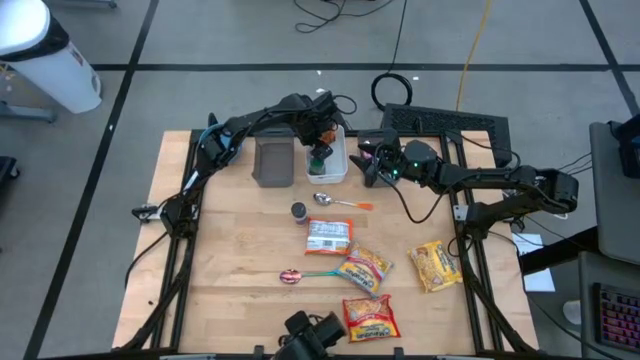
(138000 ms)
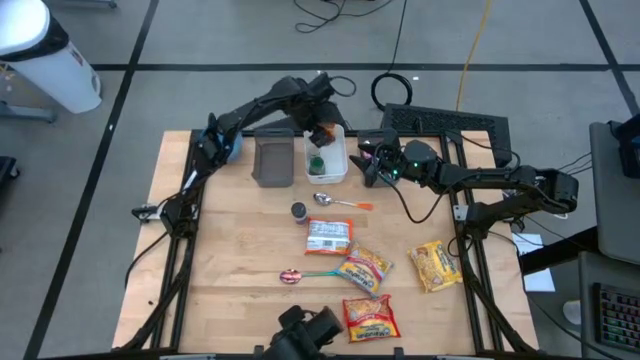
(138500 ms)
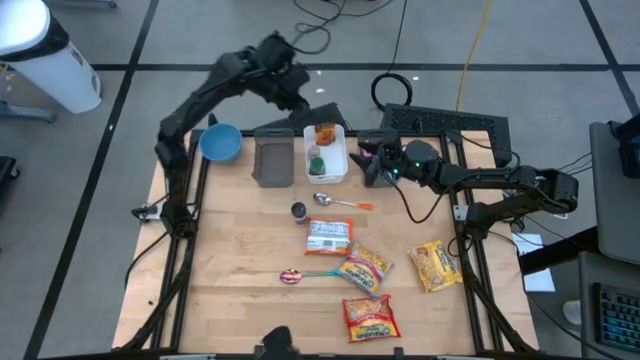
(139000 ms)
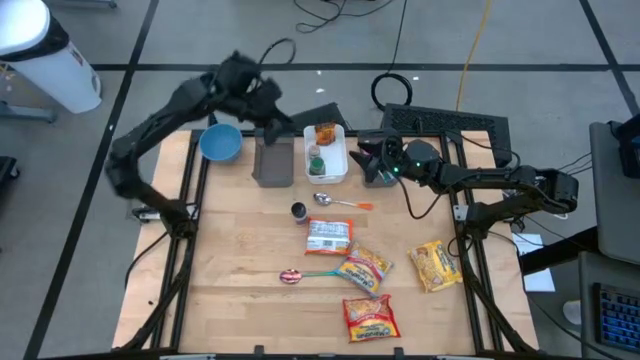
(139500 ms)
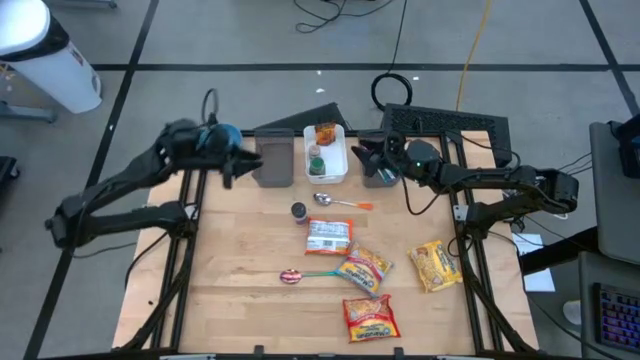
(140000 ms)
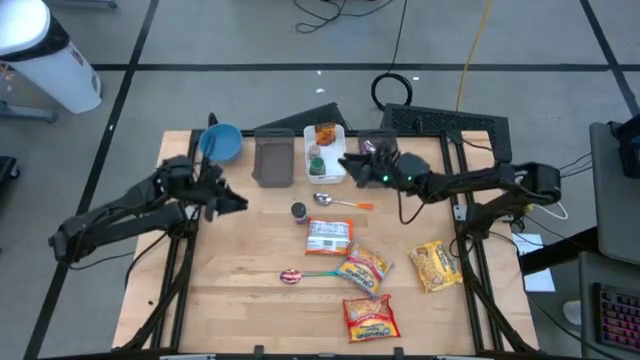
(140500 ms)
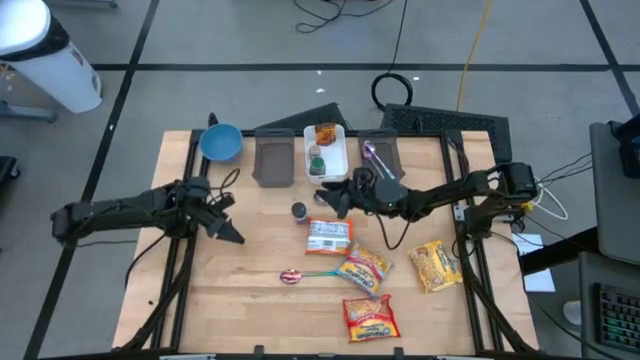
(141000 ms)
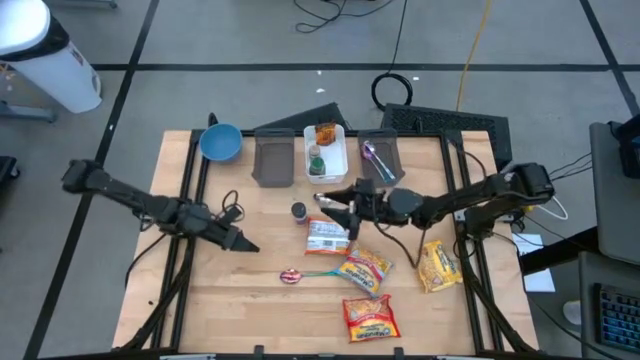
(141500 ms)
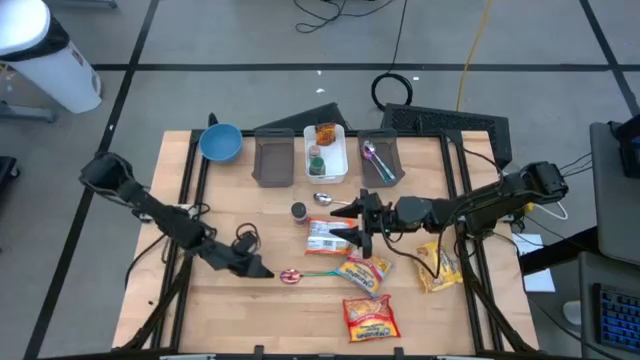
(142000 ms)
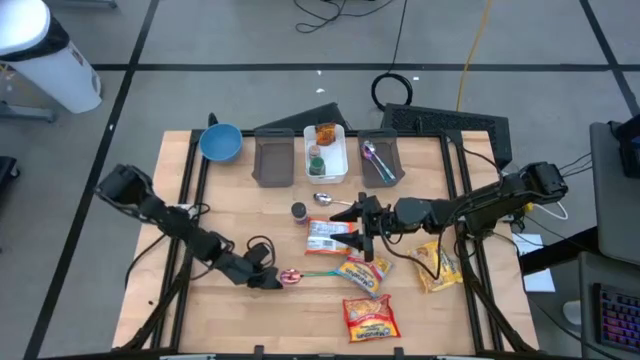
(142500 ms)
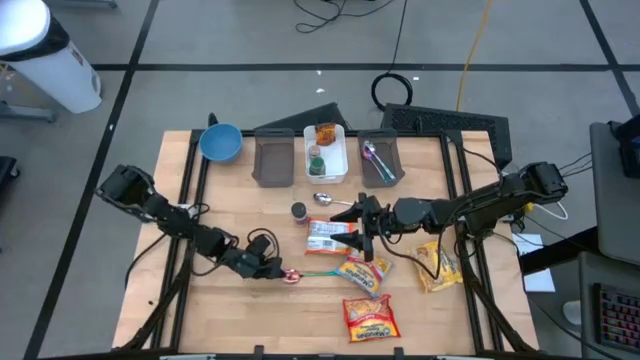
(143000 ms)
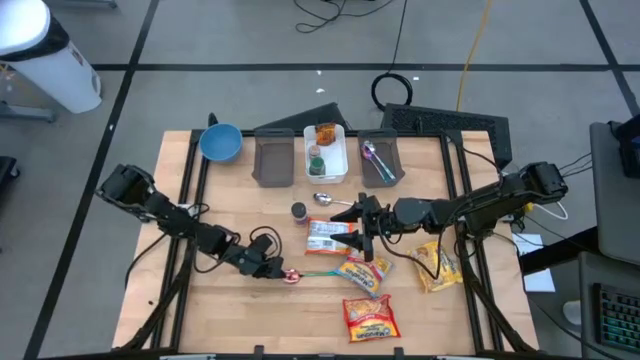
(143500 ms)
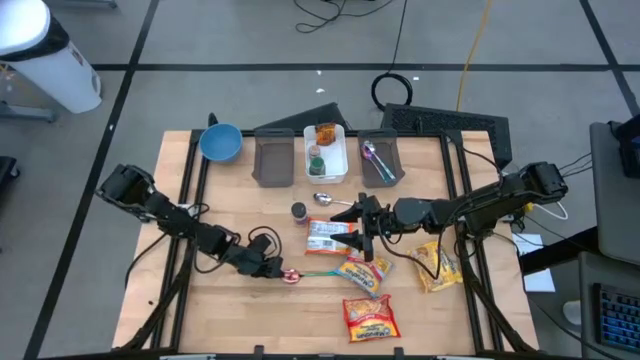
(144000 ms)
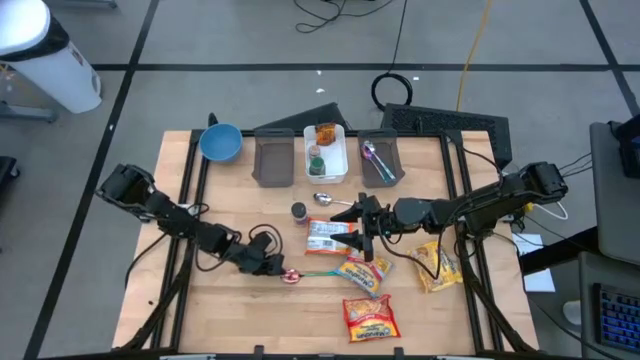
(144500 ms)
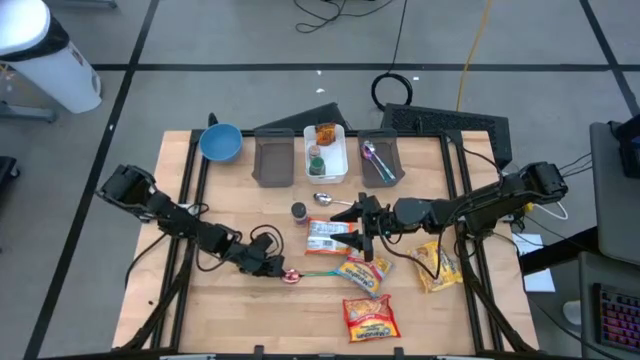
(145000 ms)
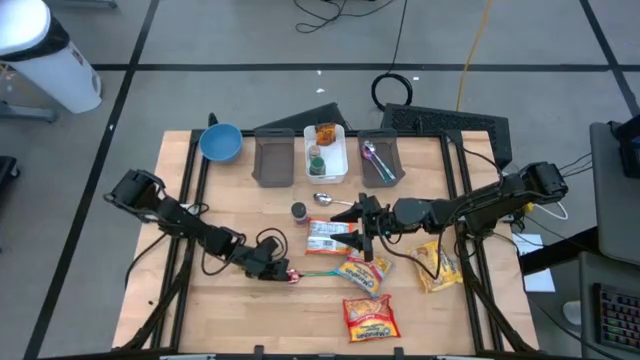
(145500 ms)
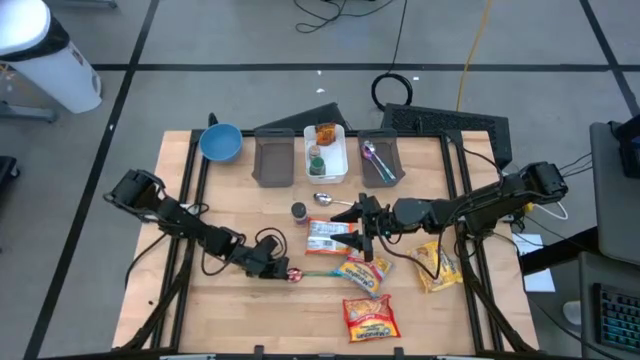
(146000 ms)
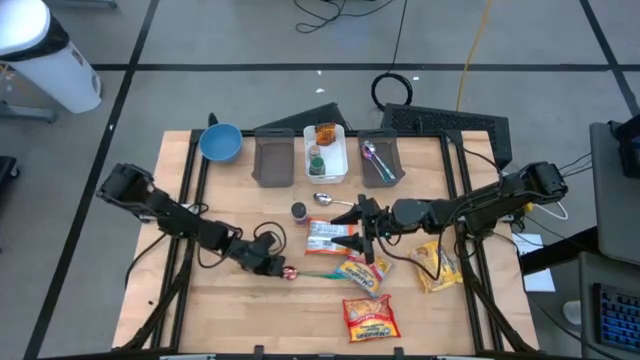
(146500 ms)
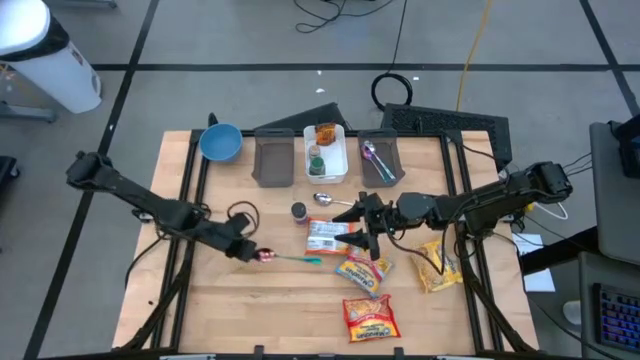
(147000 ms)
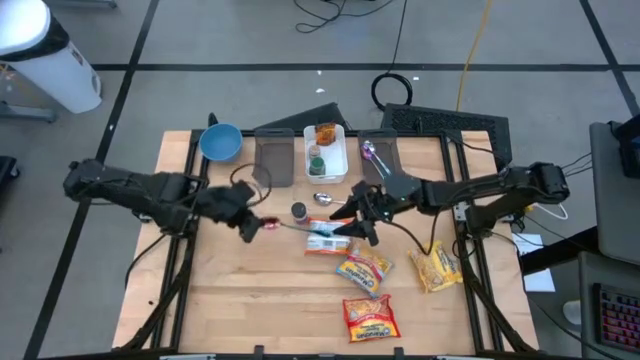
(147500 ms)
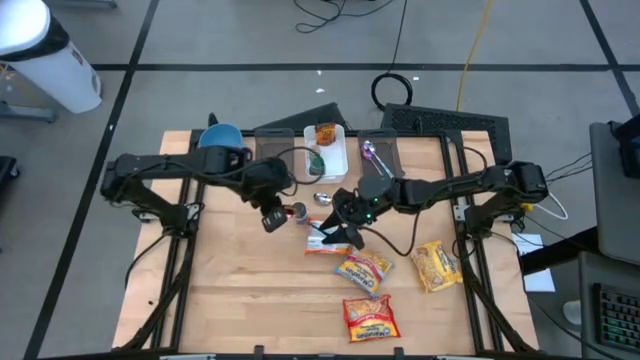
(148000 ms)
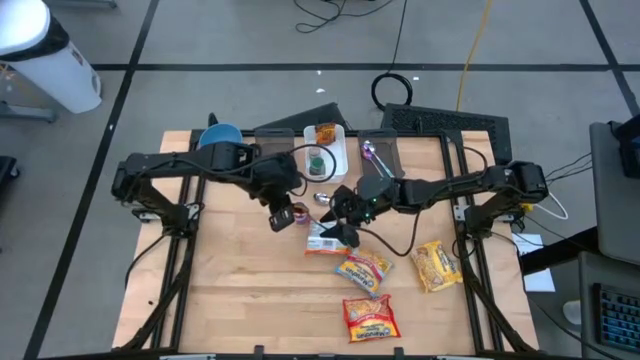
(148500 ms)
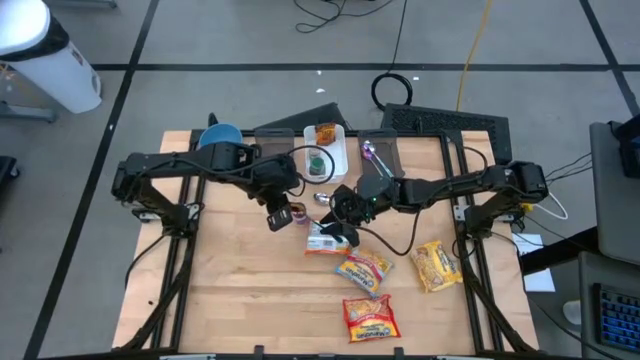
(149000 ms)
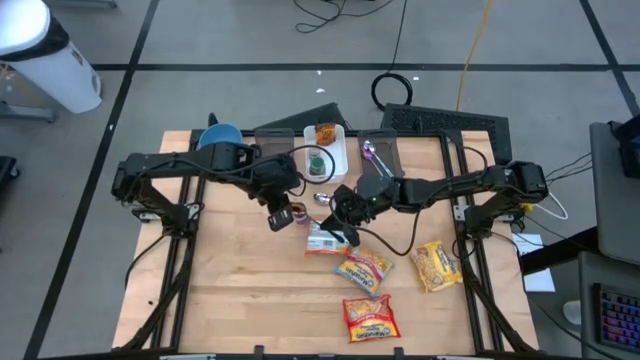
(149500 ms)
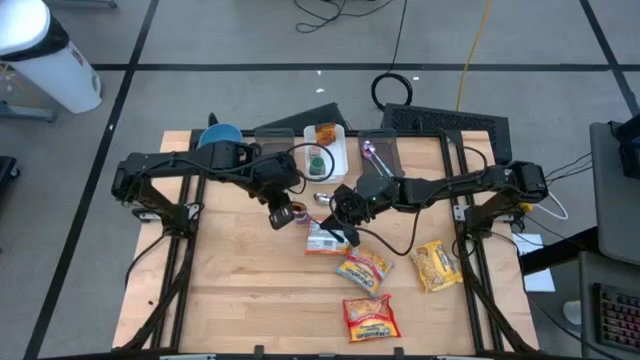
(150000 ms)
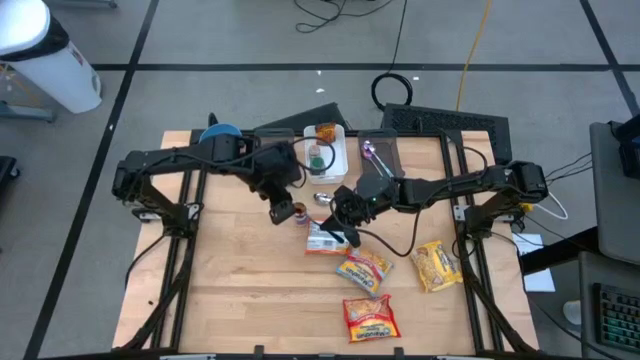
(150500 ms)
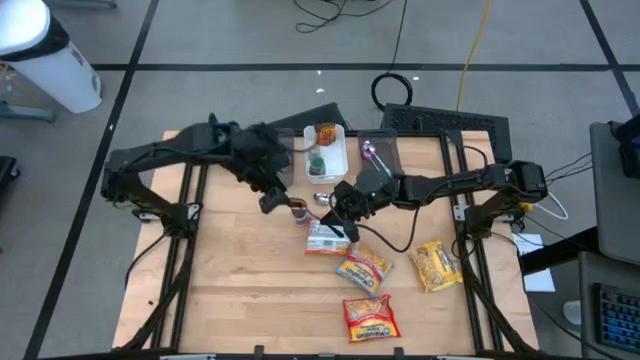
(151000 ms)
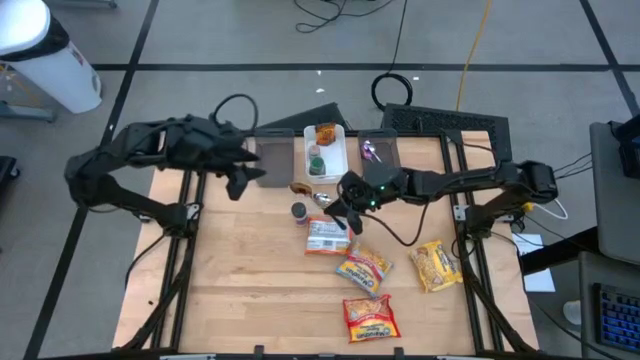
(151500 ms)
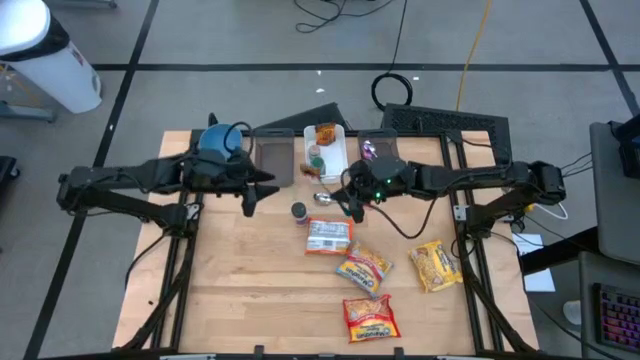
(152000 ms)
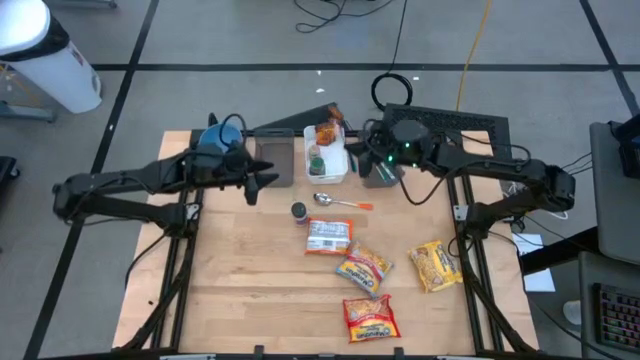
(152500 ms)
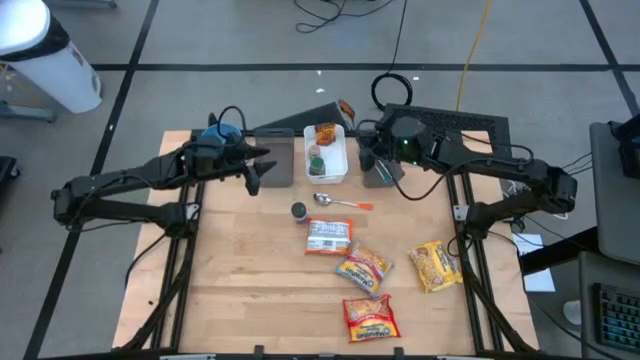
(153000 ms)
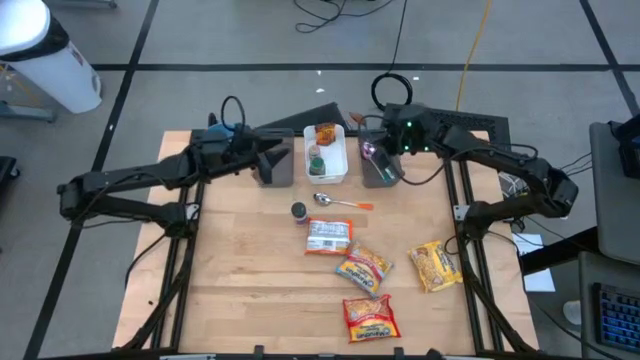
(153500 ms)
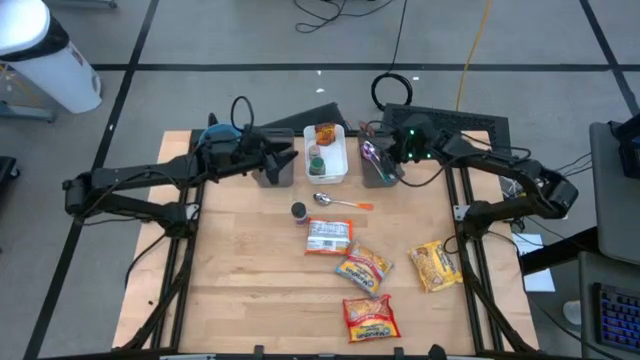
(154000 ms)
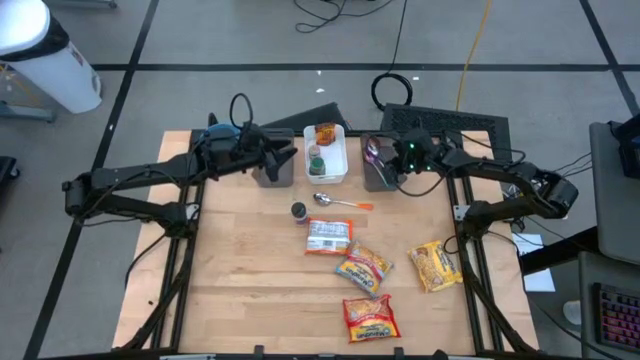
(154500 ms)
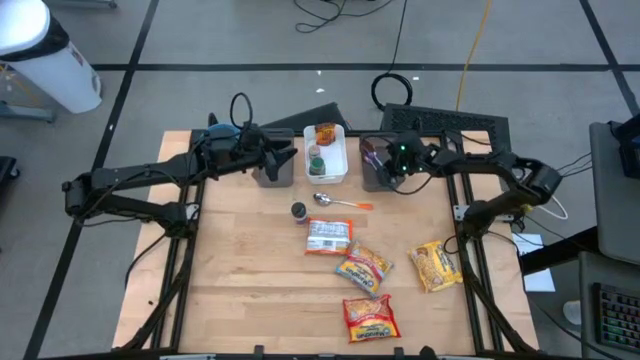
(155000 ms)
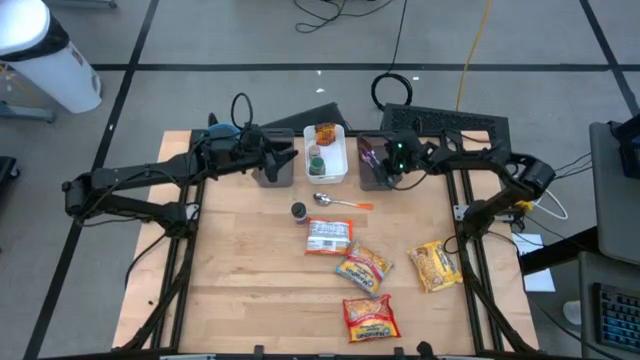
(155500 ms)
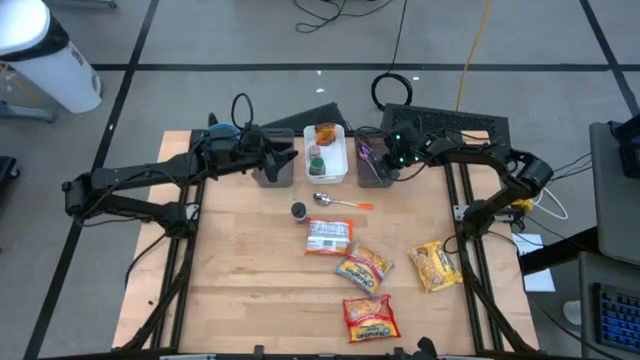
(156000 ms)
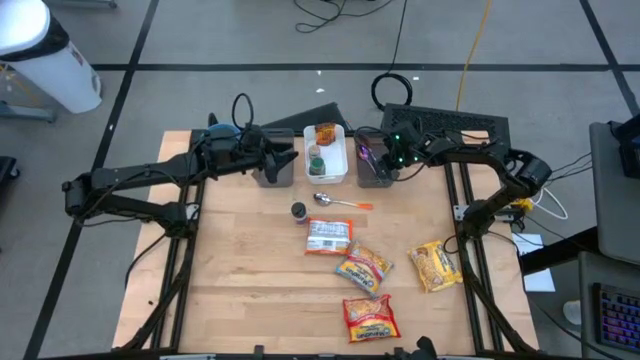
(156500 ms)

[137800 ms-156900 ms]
Task: Pick & Place Food Item
Put the rainbow spoon into the right black bin
